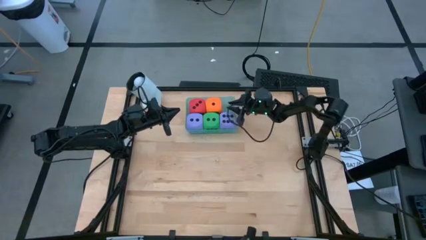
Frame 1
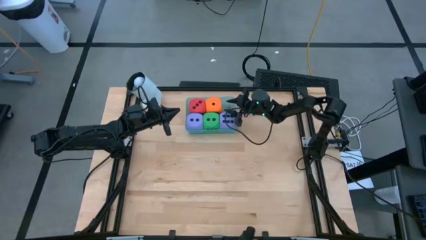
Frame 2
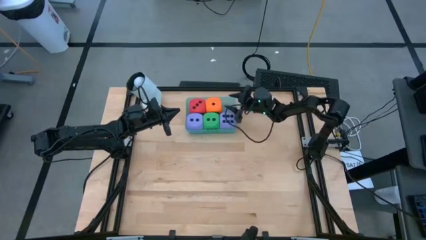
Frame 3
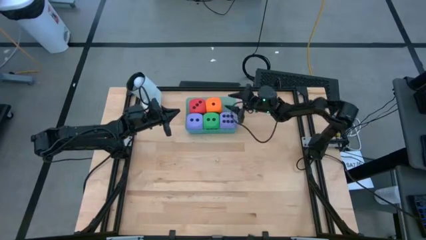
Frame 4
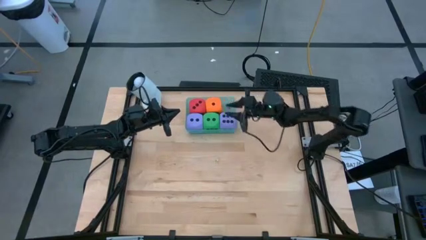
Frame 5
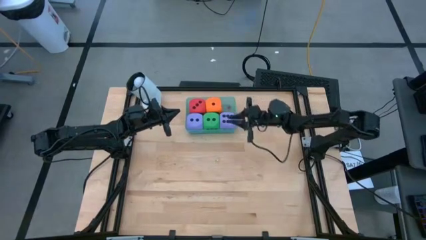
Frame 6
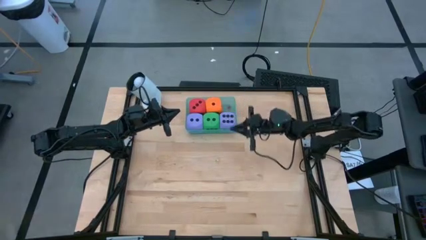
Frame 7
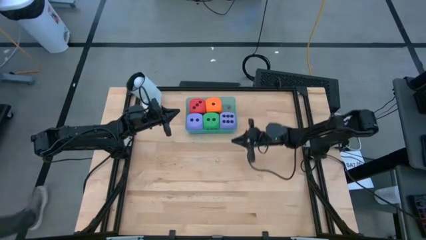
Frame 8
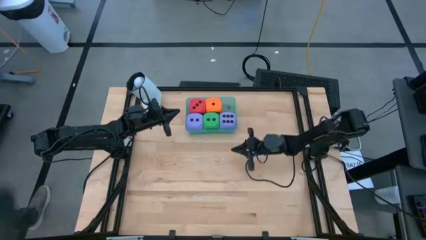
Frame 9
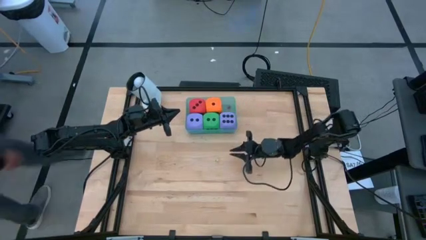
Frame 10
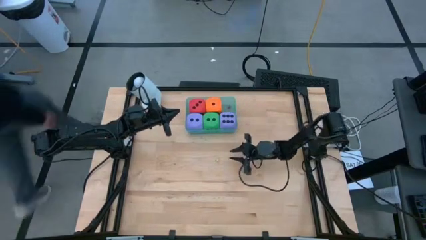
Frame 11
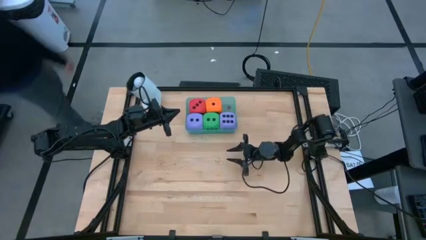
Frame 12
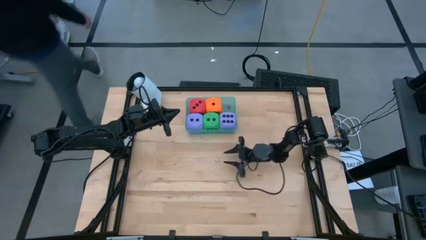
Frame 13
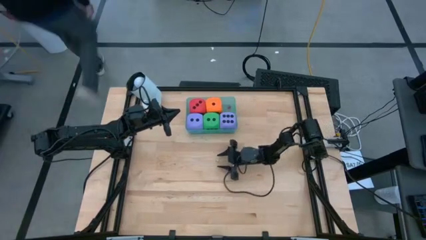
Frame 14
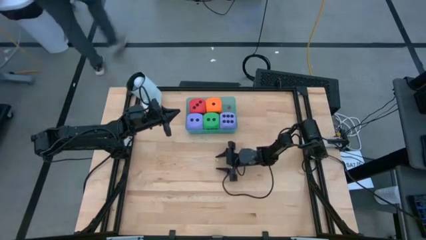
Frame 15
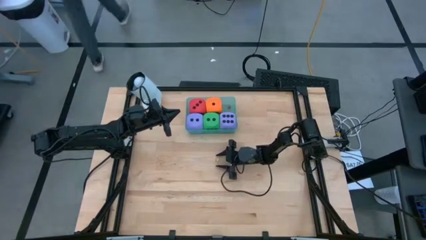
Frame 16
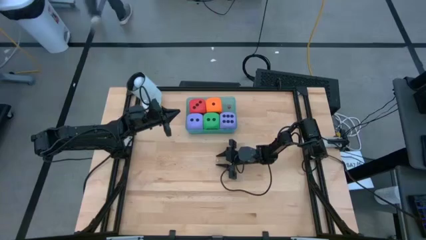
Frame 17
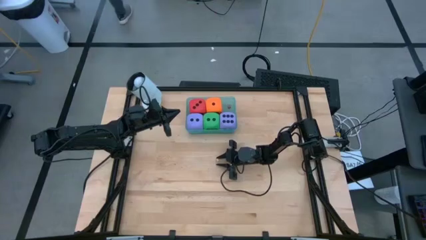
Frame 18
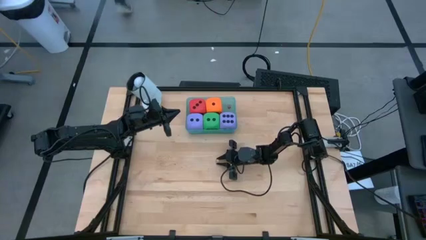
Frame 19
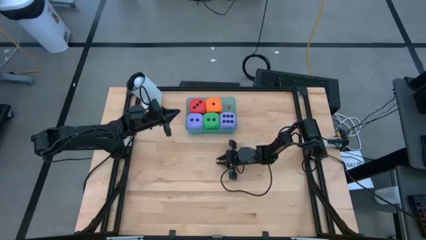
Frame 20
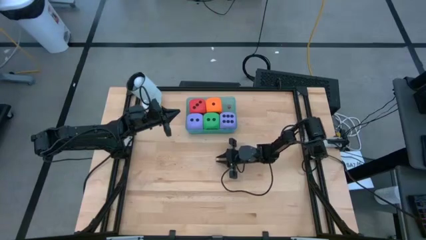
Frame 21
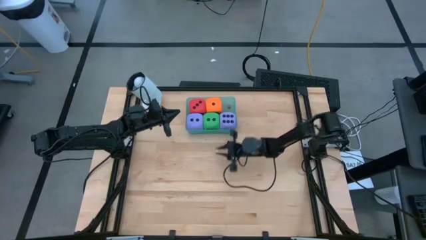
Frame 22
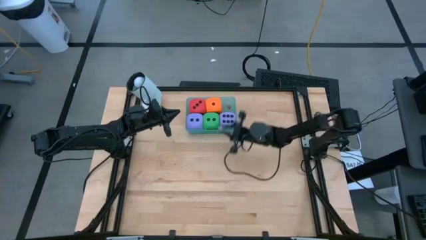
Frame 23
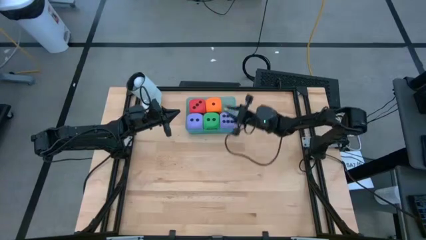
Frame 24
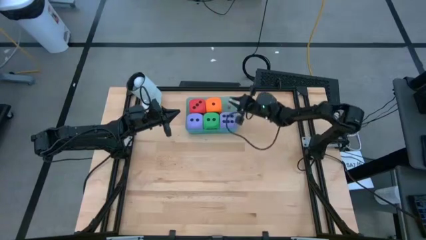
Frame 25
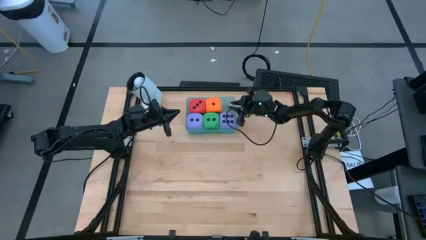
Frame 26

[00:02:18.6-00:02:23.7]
Task: Pick & Place Dice
Put the small yellow dice into the light blue bin

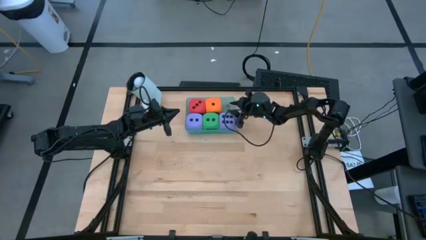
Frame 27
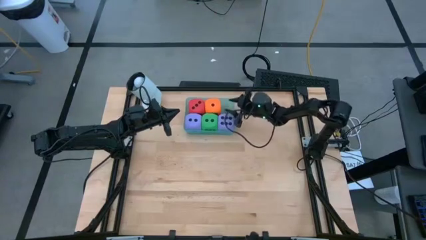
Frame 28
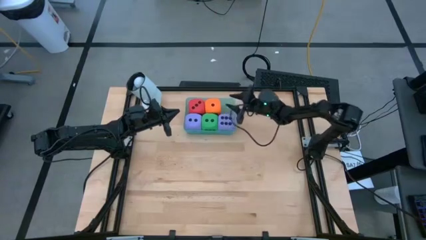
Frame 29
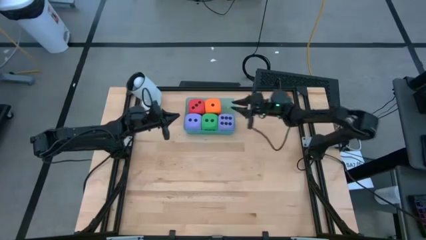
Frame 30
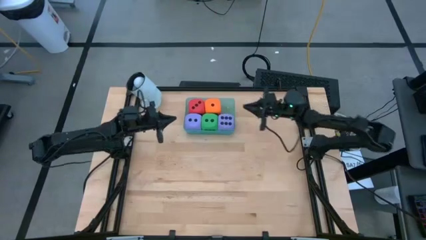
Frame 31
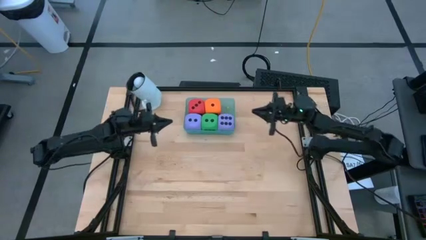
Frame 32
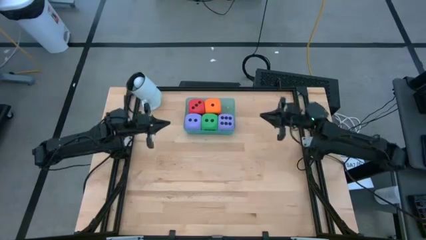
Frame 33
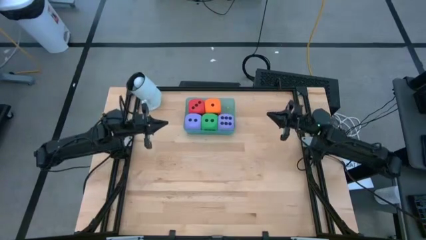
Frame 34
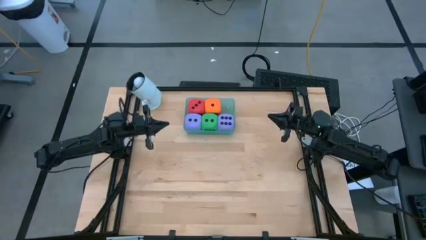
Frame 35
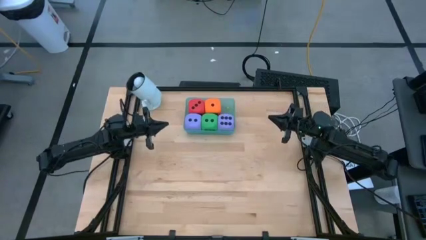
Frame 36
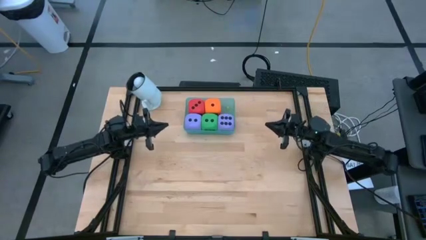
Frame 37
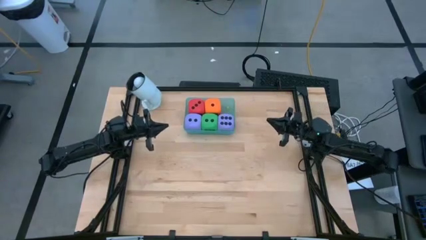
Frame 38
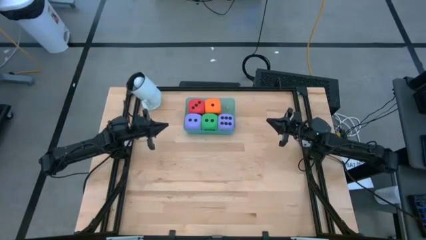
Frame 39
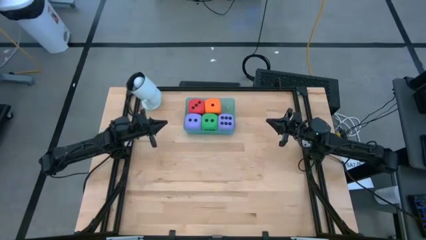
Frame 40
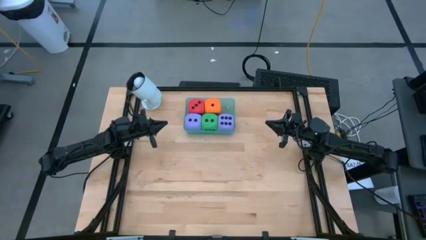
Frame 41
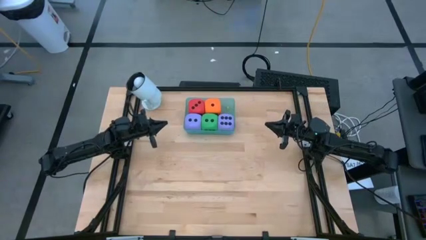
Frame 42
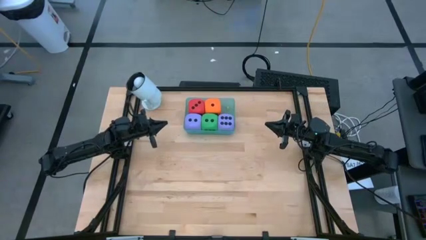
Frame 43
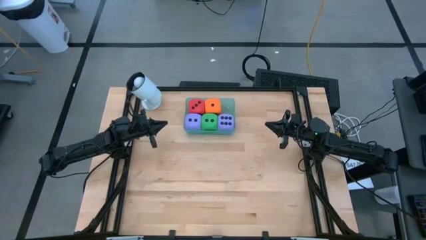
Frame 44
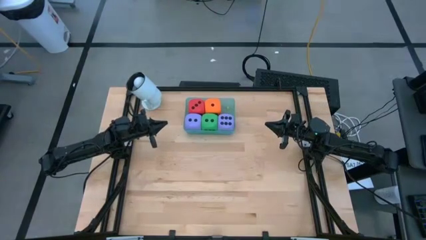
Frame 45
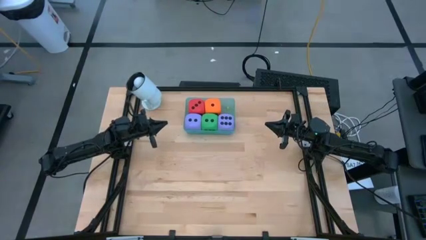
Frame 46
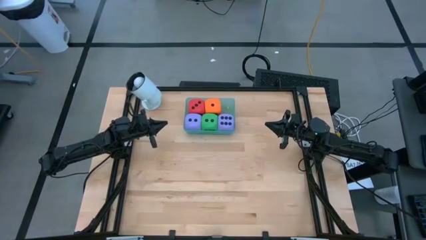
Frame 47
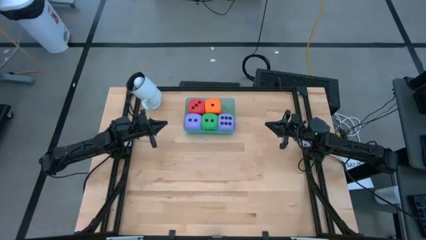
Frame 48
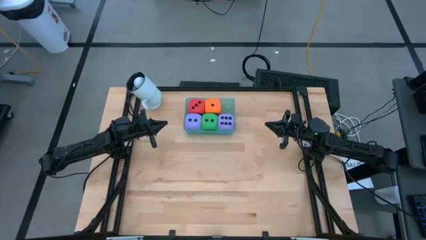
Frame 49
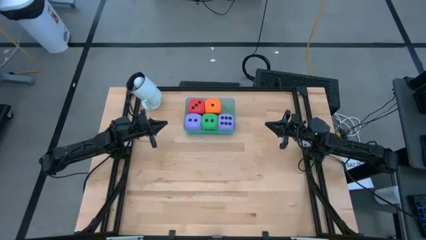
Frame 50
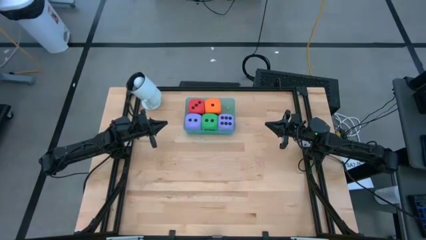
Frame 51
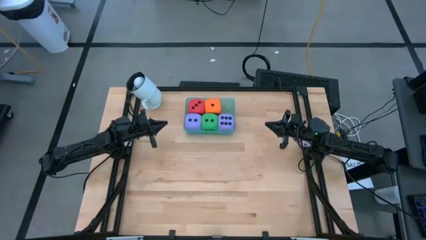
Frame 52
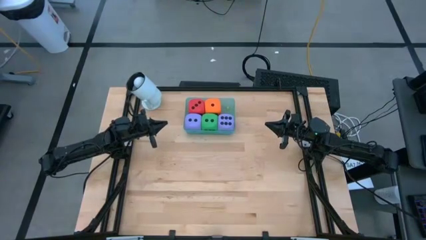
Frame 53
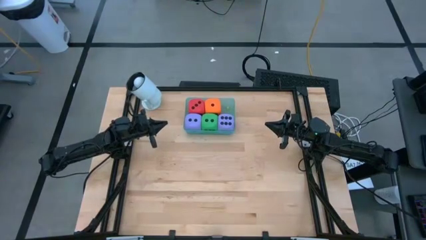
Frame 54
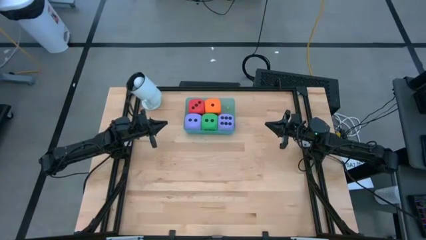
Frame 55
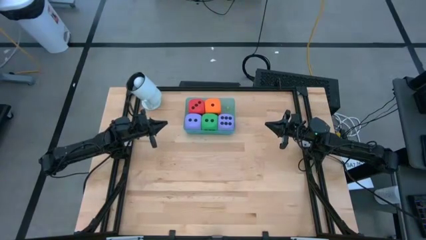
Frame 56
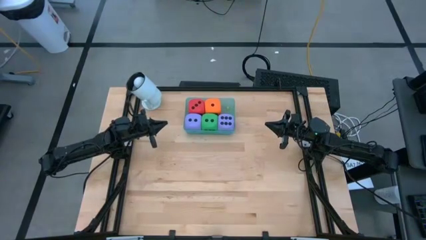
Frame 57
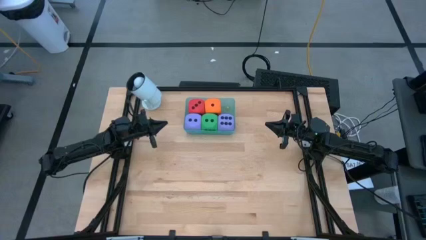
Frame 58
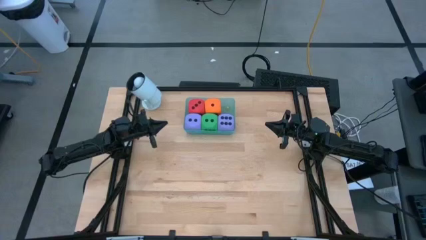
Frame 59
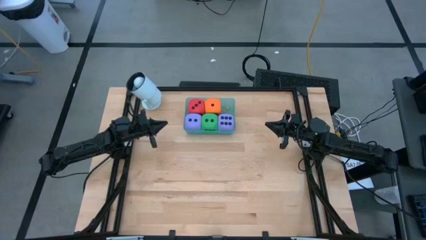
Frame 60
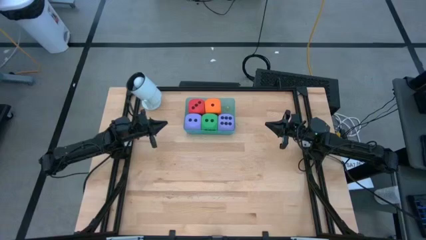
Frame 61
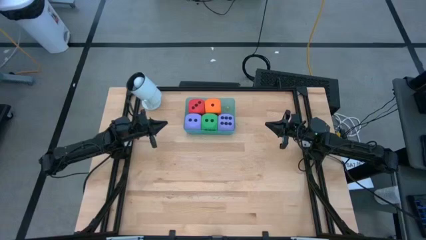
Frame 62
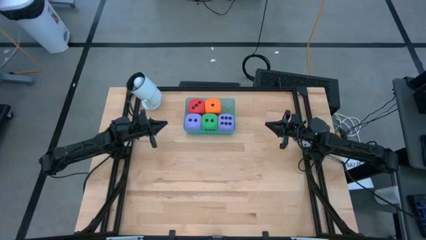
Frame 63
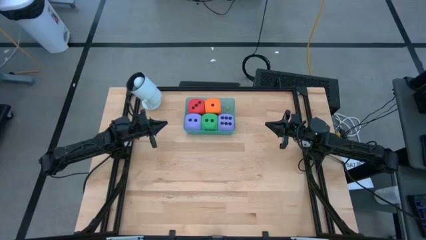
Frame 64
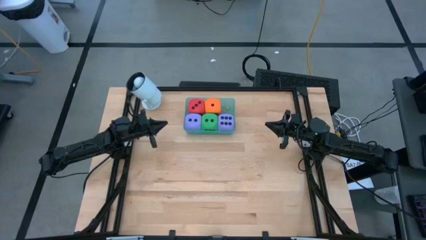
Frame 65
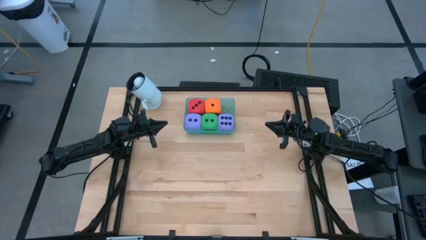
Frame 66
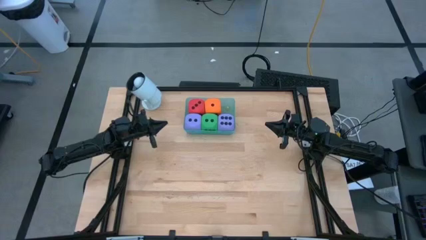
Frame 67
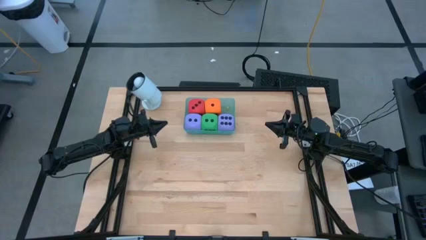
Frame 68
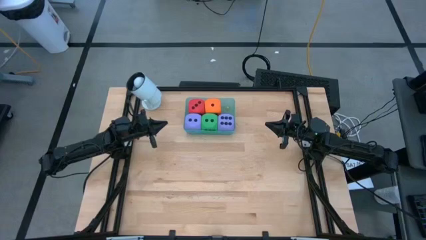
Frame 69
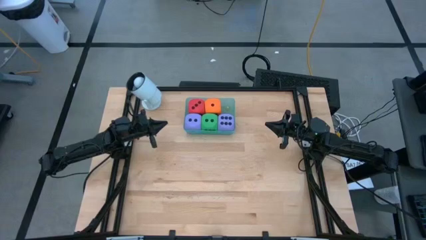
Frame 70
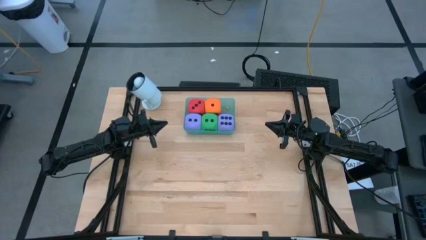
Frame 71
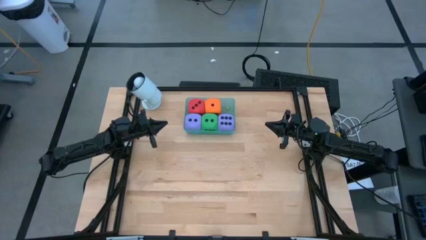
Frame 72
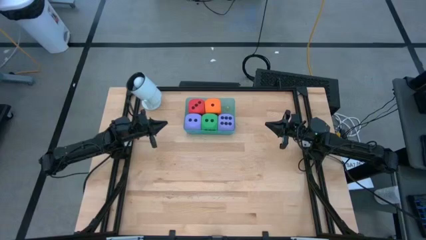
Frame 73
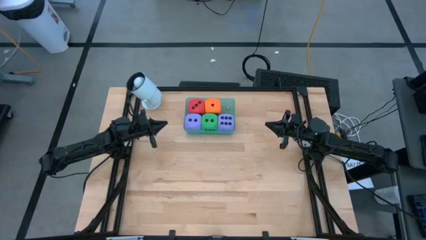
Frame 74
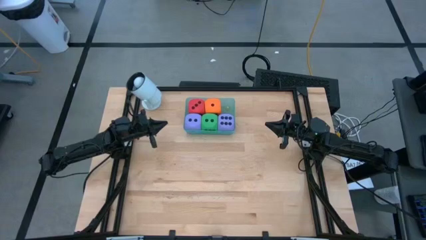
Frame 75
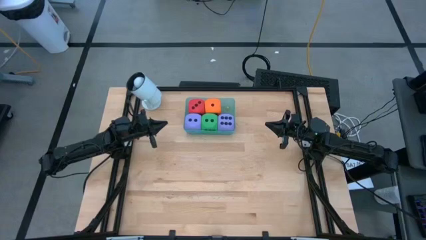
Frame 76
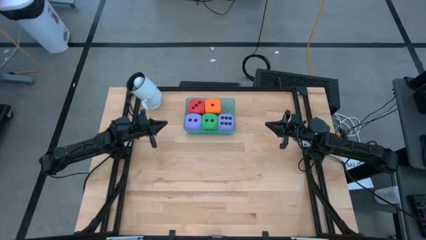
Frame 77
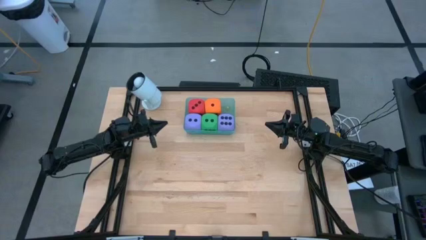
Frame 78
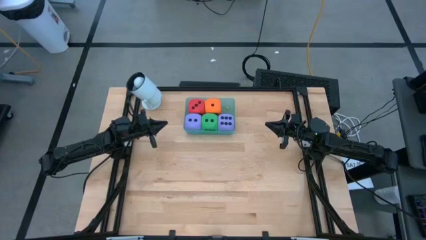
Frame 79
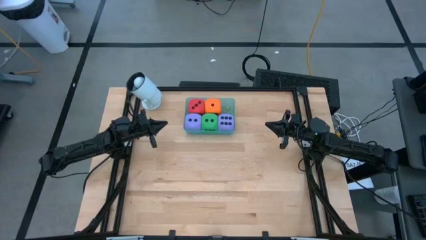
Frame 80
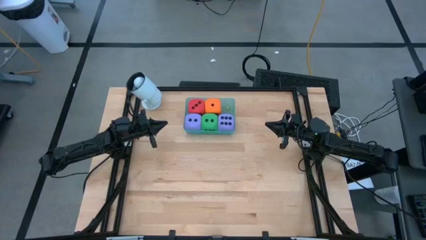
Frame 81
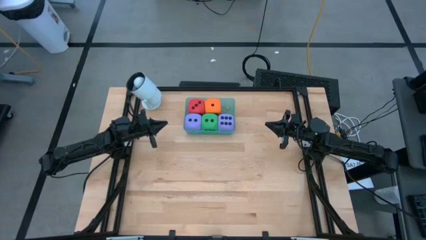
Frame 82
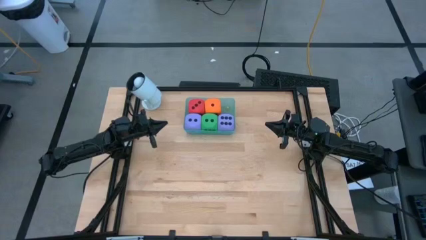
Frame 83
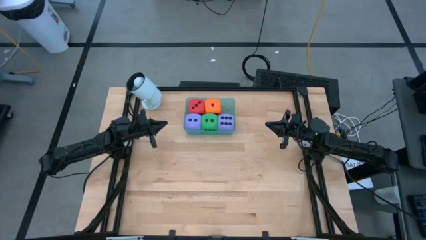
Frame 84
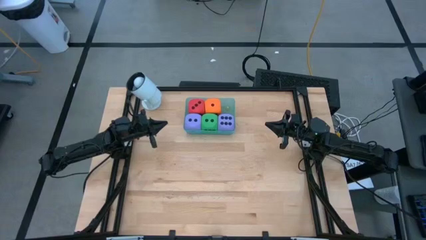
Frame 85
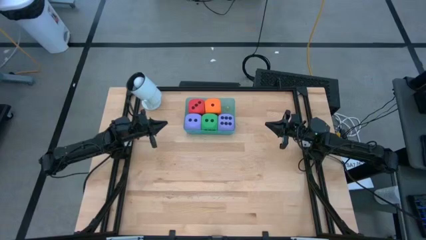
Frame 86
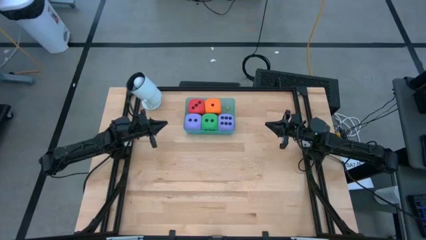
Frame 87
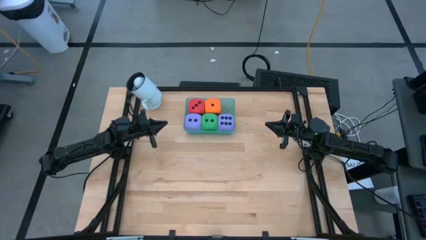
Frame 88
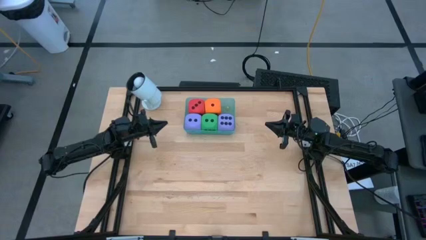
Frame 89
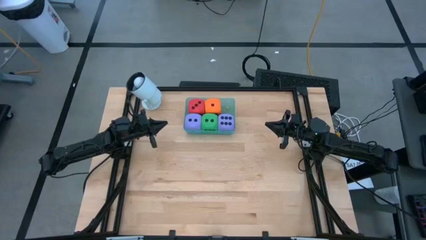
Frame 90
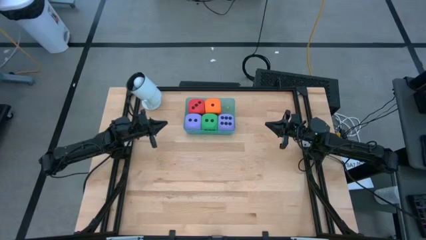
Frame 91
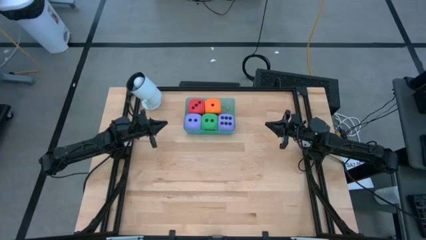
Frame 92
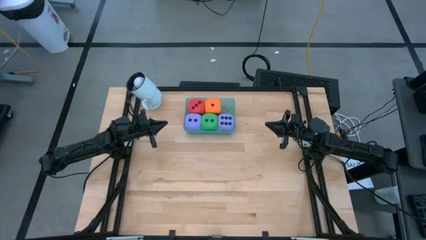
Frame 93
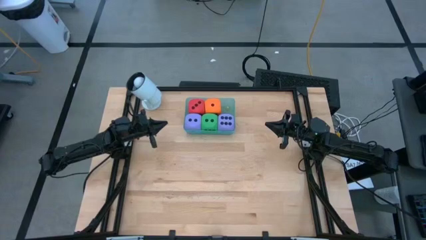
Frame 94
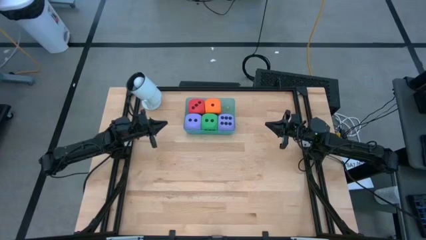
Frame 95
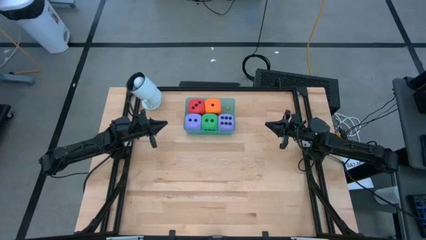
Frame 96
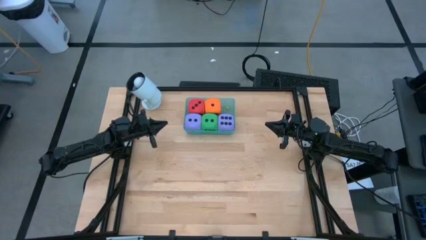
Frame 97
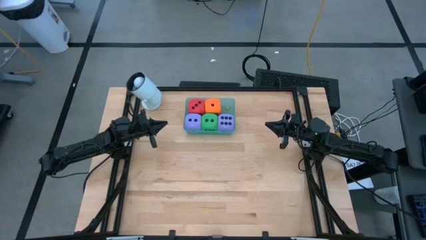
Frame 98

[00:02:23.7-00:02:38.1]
Return to Home Position
